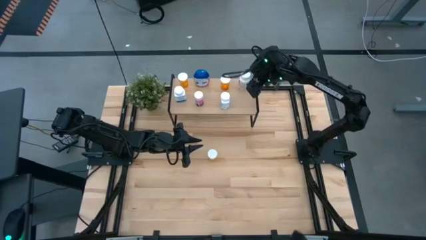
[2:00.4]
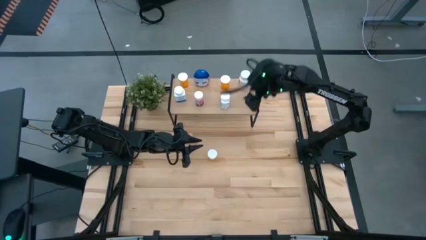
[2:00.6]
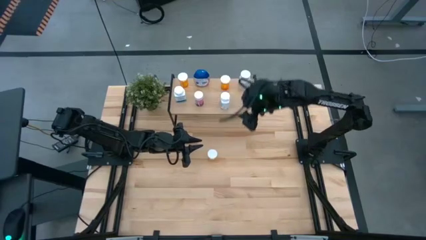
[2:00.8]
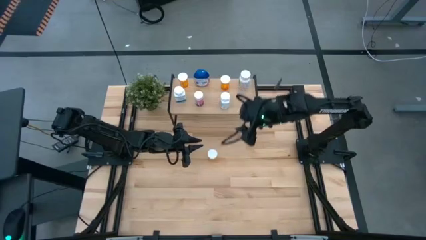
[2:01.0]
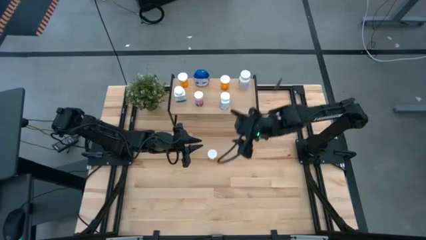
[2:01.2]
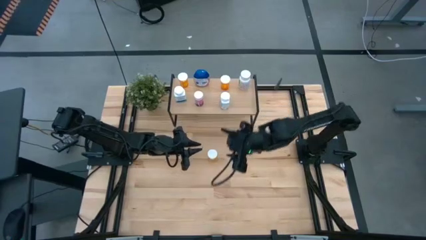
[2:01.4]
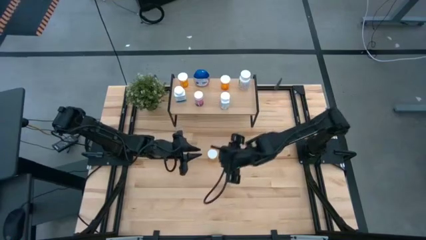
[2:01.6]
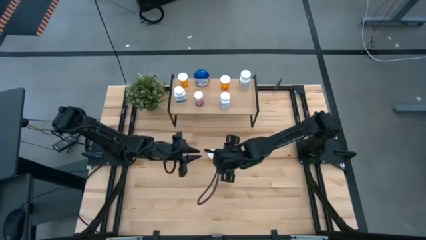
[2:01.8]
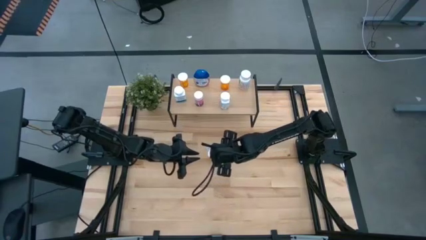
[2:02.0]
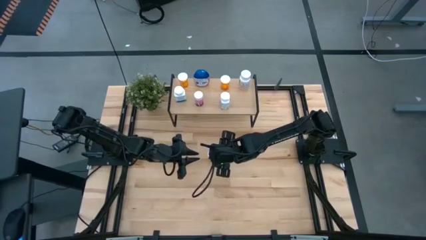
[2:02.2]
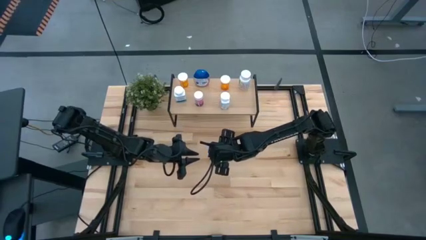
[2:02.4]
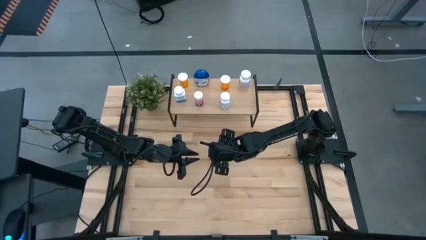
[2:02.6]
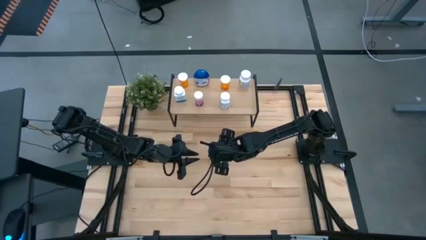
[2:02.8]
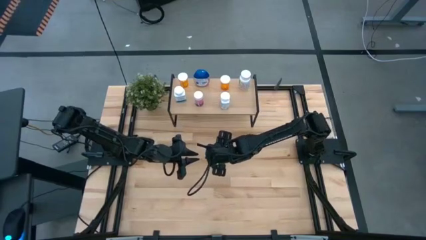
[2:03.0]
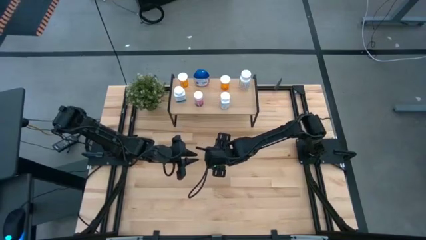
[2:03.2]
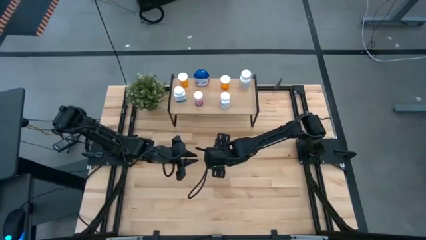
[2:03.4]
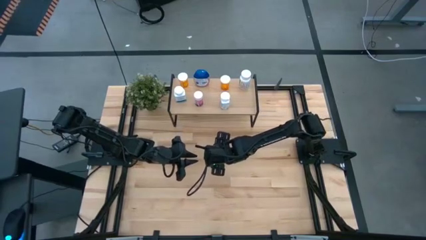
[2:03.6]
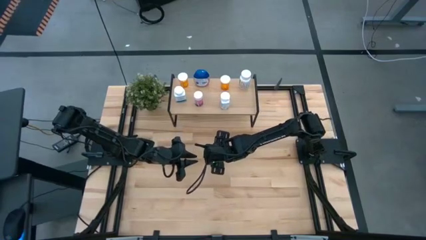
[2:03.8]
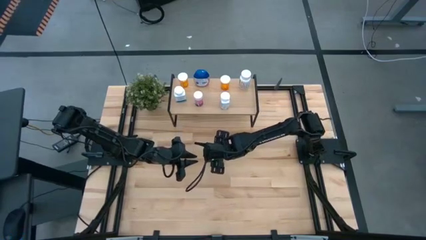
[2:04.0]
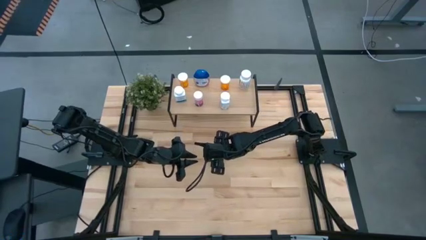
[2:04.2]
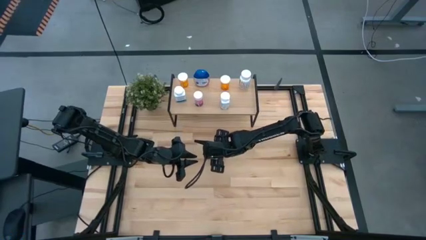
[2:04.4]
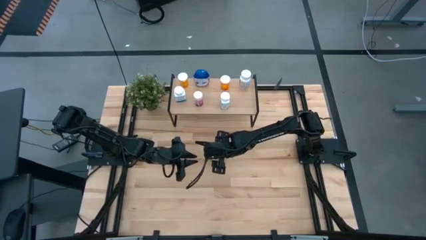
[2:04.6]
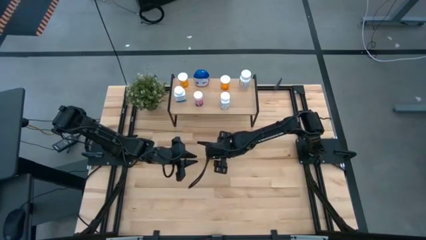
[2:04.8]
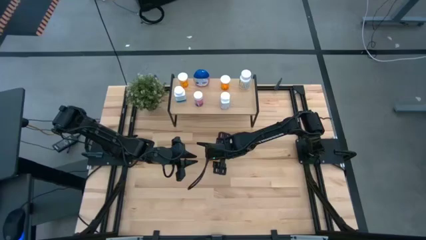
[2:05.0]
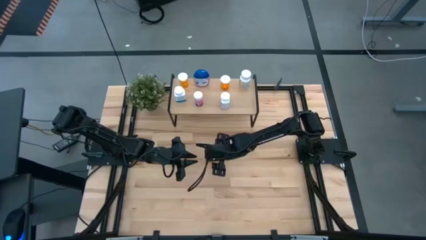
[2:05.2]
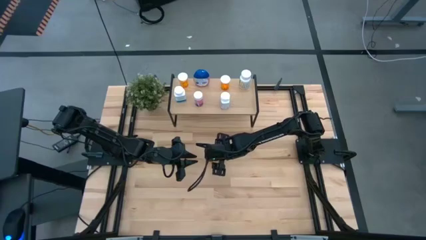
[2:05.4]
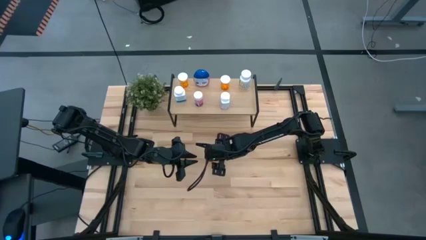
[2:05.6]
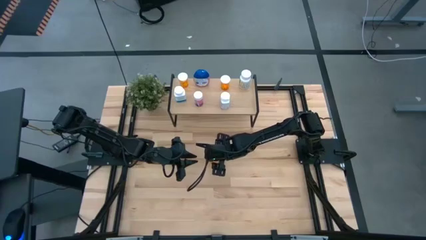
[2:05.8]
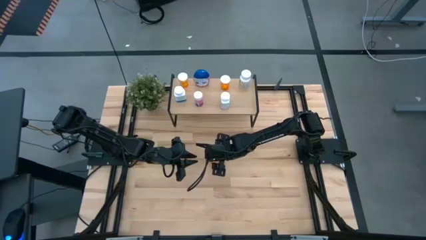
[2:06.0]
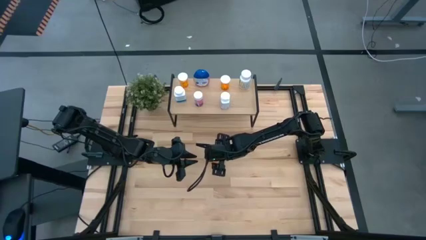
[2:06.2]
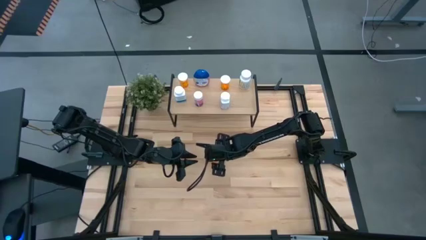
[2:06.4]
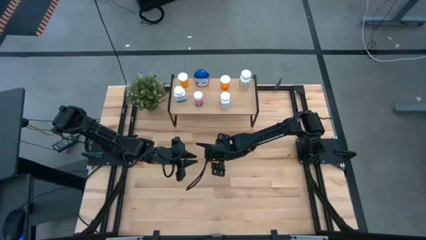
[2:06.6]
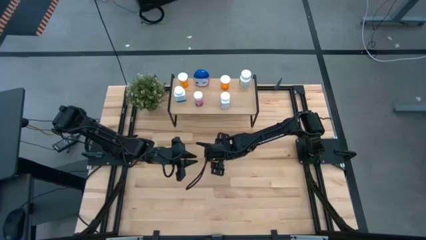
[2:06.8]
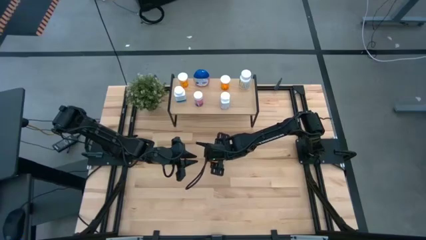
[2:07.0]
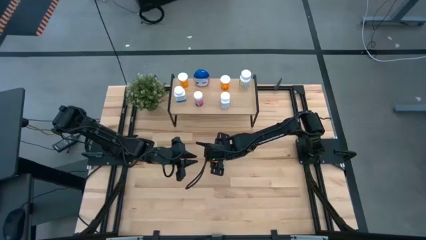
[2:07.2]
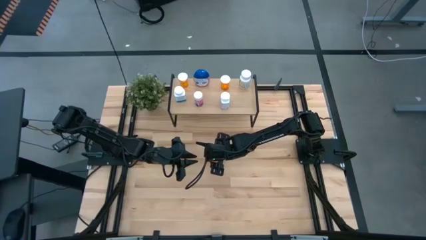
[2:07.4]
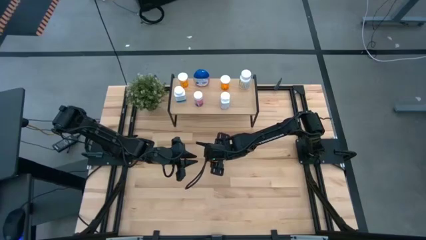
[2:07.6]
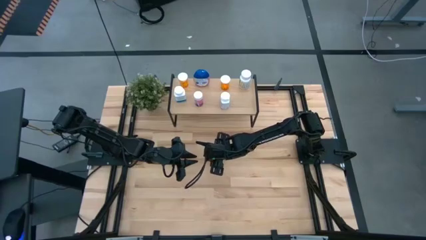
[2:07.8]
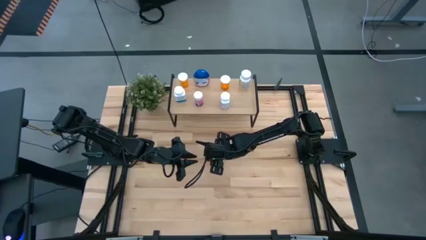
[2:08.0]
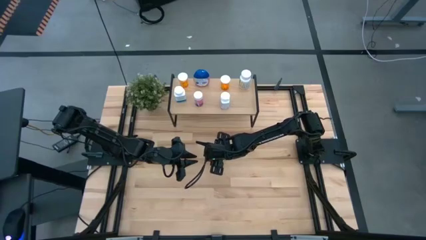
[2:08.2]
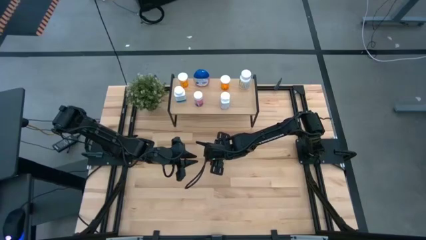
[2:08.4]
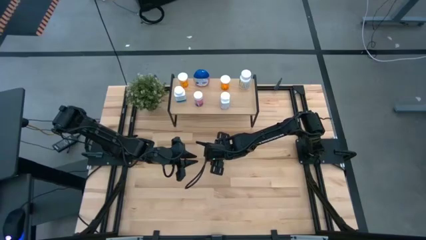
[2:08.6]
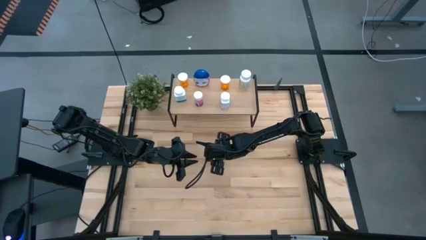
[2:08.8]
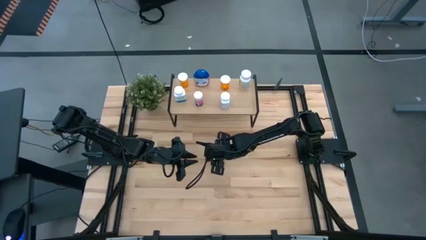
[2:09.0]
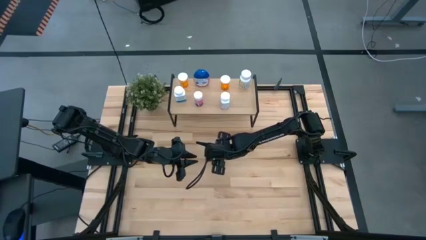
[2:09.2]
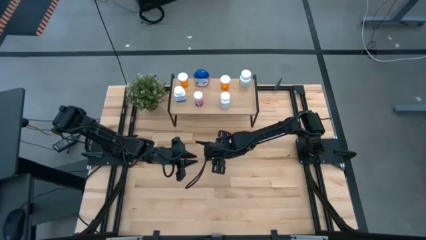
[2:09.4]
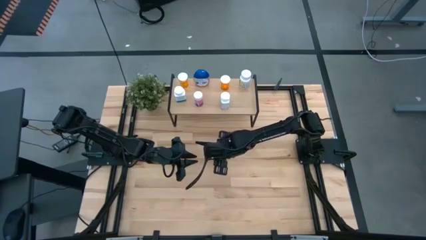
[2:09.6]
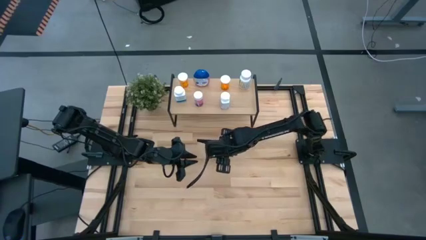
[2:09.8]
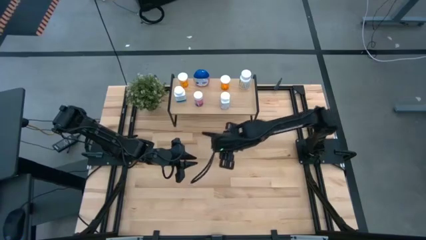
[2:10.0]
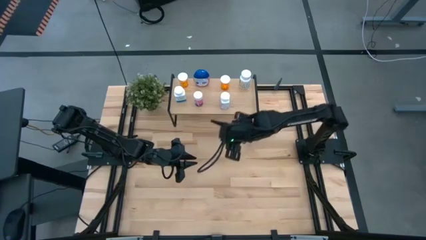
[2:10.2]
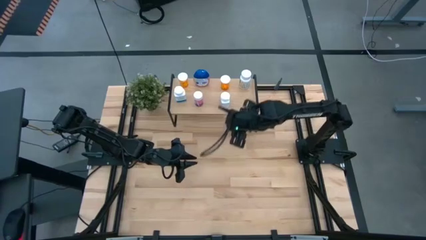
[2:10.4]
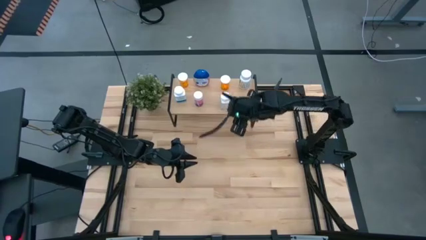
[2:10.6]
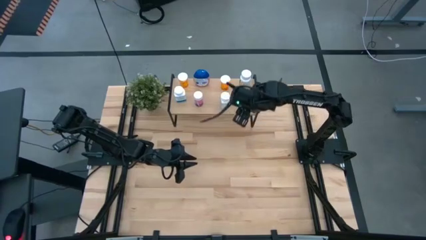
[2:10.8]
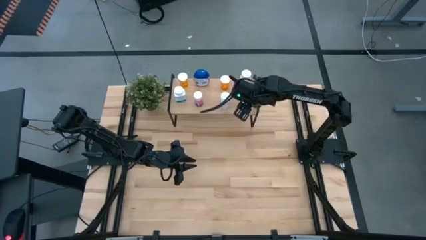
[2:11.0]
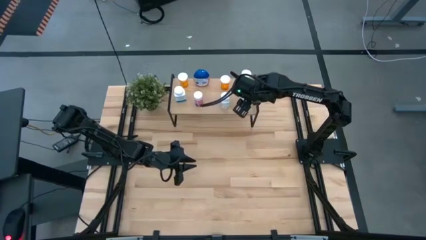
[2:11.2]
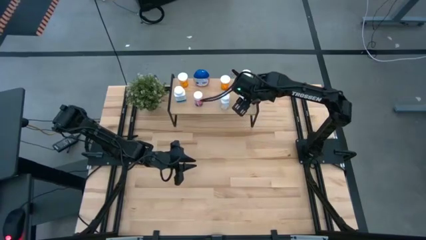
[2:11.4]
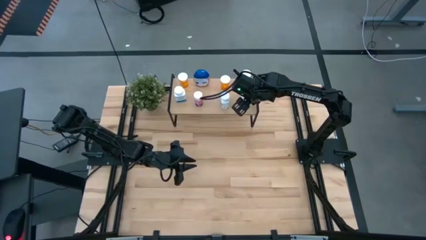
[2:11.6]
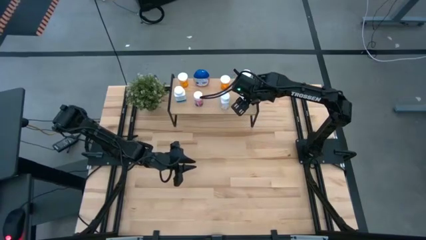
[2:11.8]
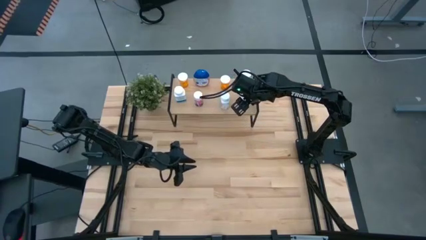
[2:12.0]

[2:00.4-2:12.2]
Task: Pick and place medicine bottles onto shelf by color
Put the orange pill bottle on the shelf

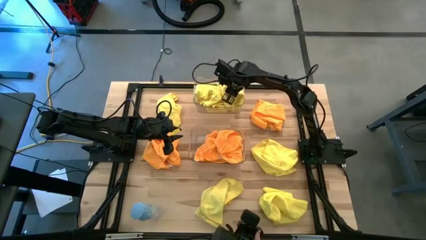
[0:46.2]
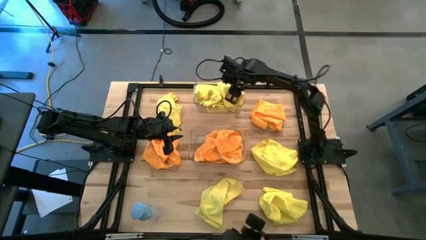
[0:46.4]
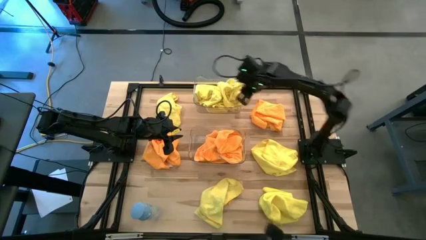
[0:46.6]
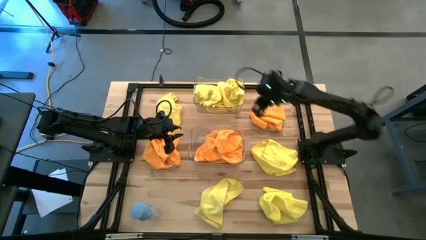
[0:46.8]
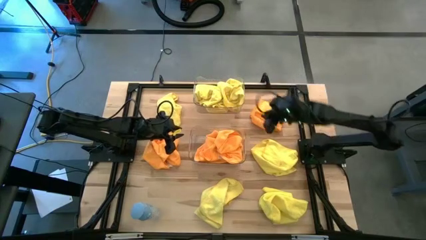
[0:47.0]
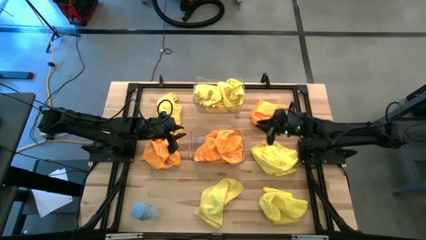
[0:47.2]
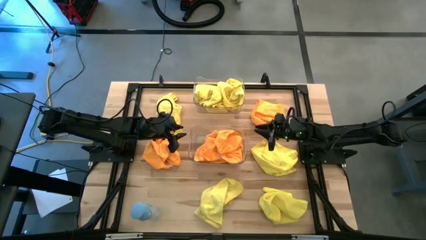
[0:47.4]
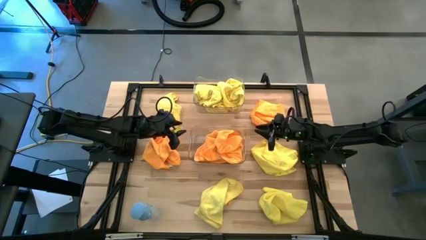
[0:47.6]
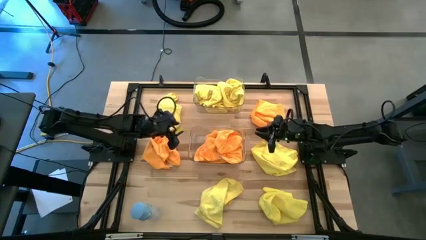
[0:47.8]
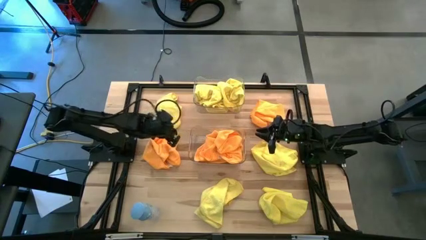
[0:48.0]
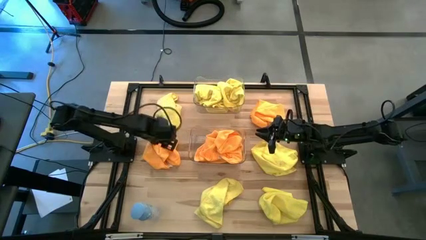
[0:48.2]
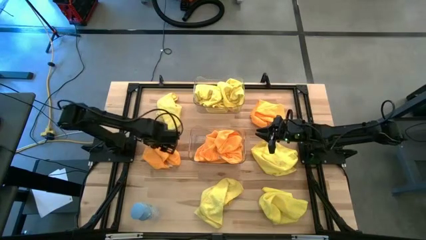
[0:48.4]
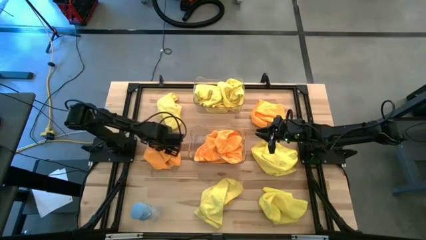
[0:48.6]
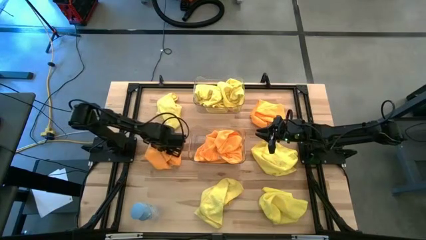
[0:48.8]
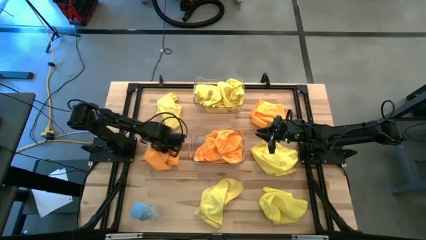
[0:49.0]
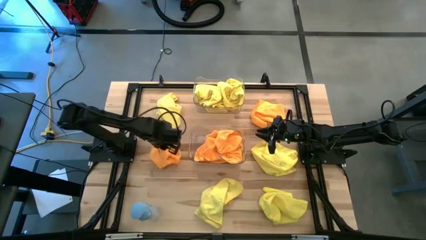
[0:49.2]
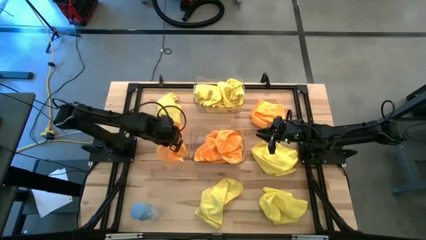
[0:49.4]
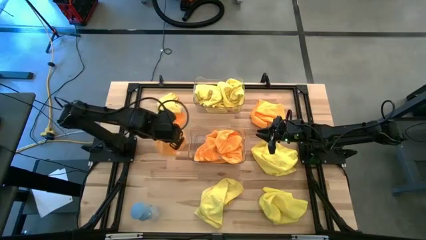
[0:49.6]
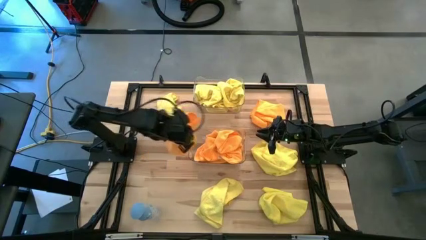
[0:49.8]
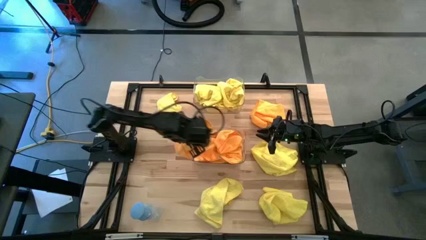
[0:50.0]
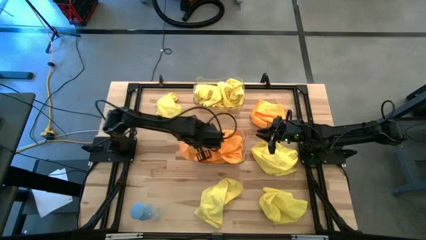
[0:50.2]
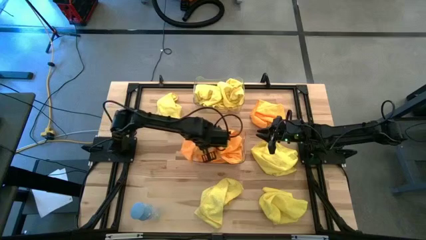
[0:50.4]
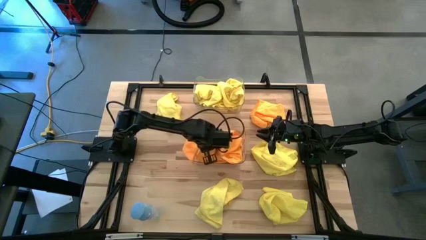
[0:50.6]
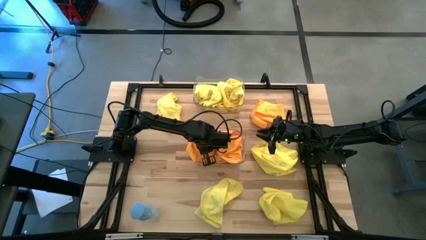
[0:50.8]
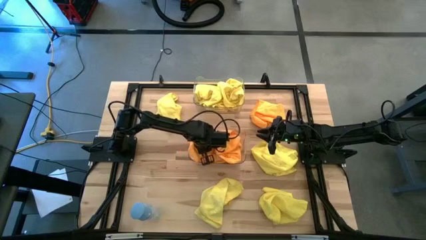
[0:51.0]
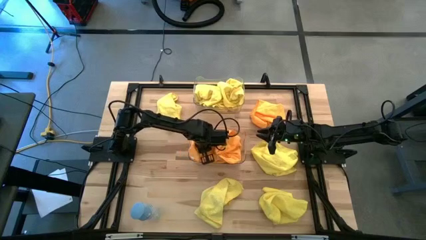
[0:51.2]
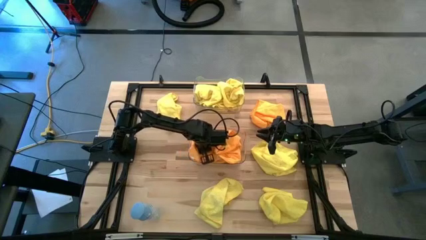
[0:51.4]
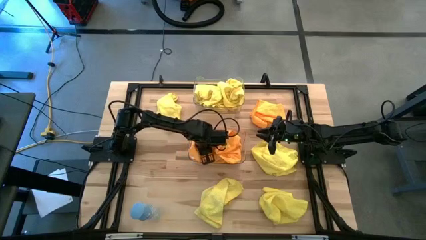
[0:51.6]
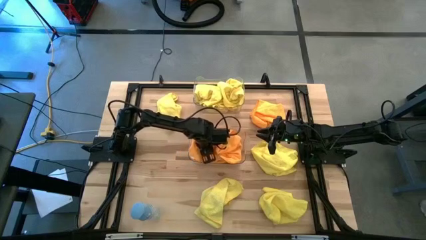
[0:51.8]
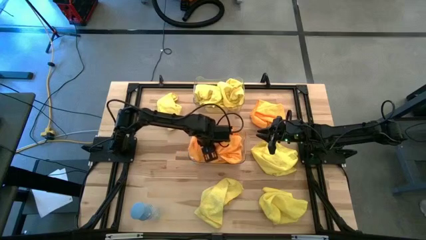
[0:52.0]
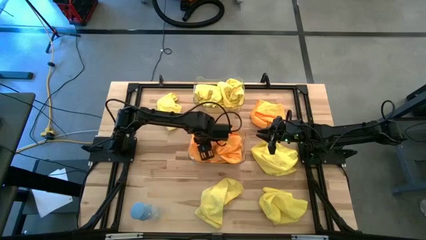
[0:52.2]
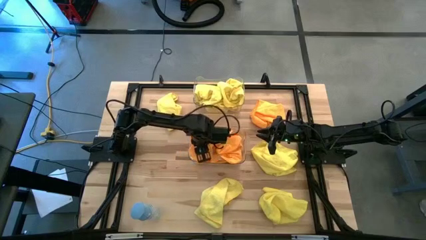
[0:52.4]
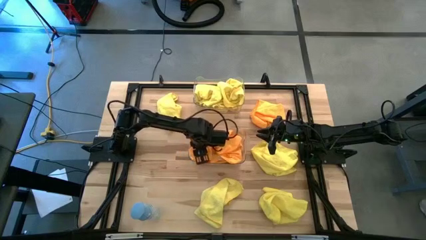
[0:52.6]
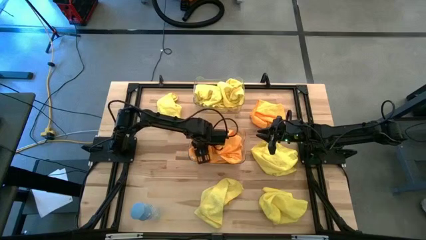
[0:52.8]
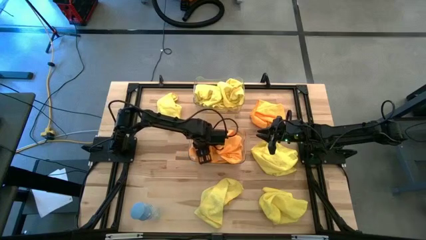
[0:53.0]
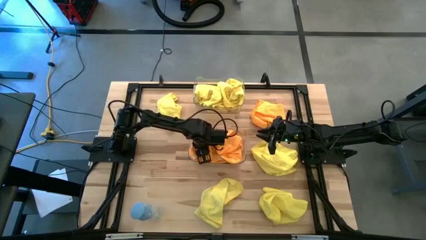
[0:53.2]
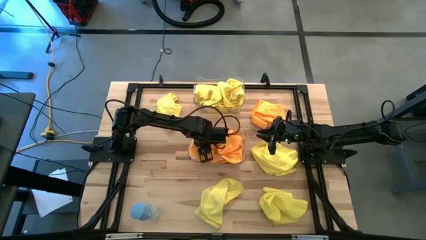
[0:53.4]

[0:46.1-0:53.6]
Task: Sort microfiber towel by color & place in baskets
Put the orange microfiber towel into the bottom transparent bin
